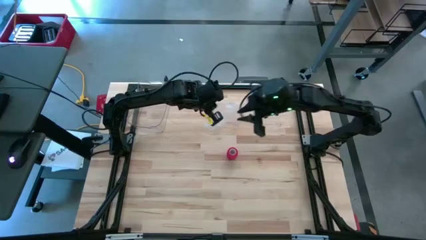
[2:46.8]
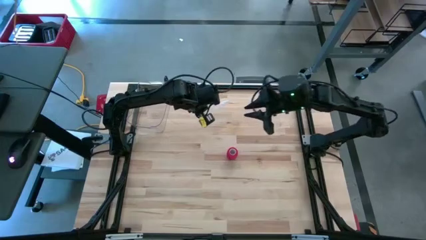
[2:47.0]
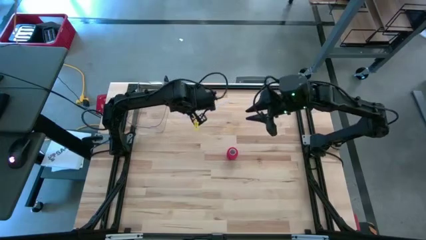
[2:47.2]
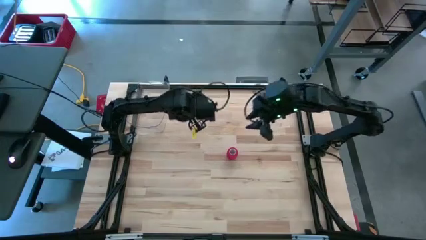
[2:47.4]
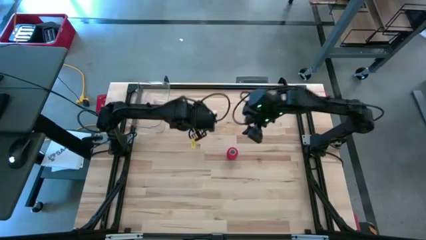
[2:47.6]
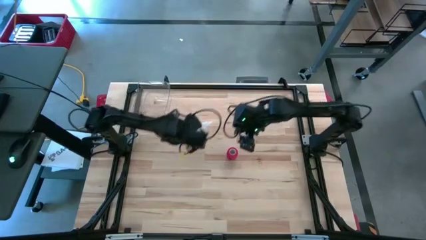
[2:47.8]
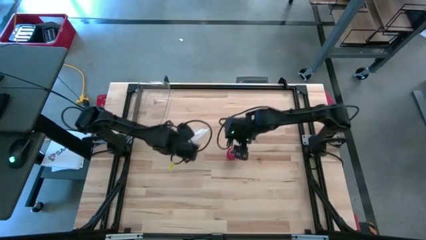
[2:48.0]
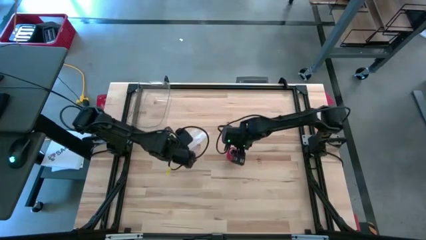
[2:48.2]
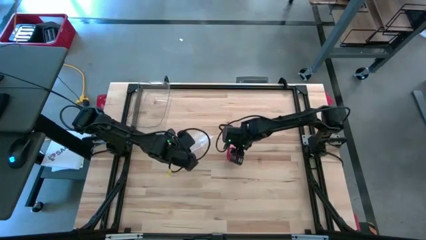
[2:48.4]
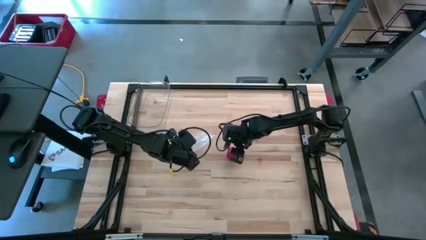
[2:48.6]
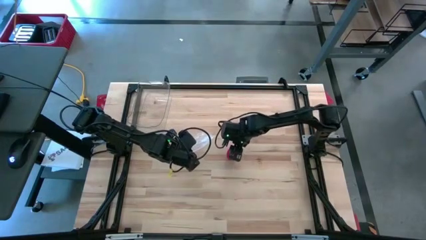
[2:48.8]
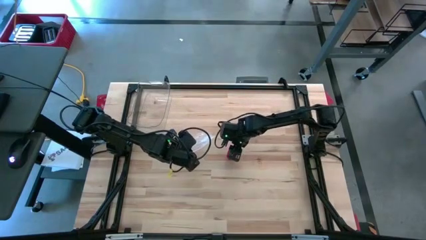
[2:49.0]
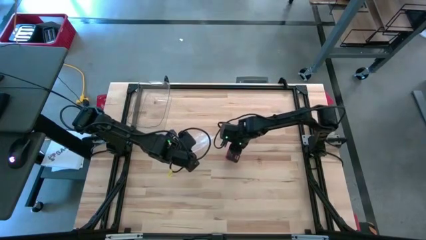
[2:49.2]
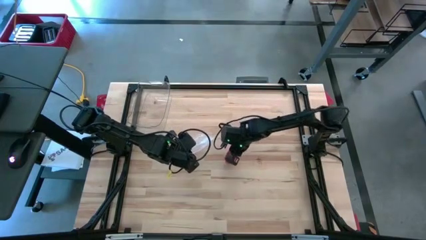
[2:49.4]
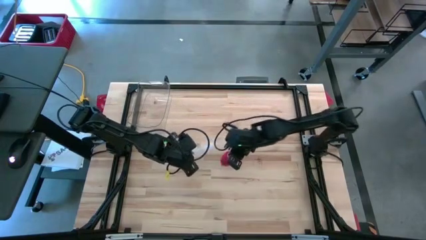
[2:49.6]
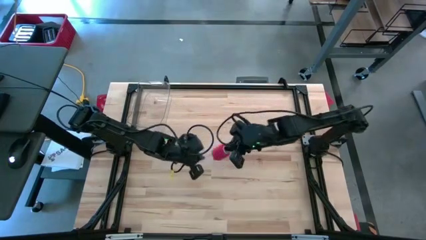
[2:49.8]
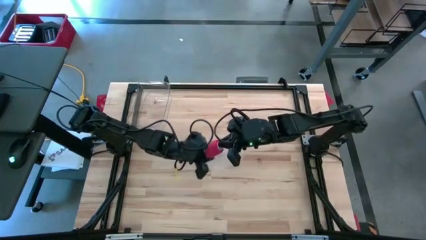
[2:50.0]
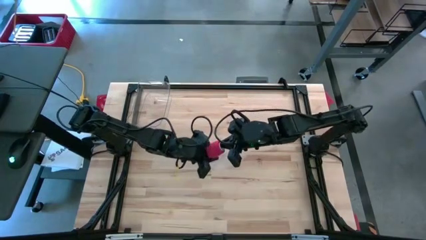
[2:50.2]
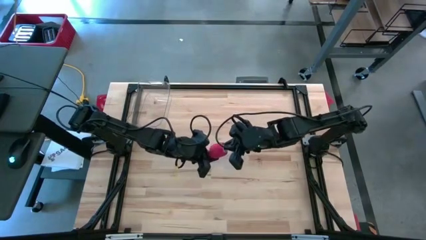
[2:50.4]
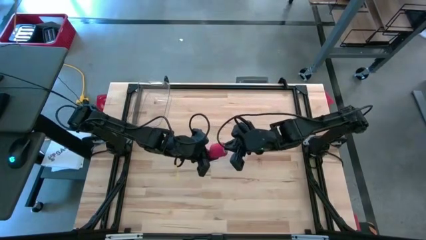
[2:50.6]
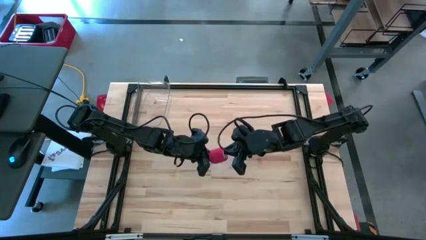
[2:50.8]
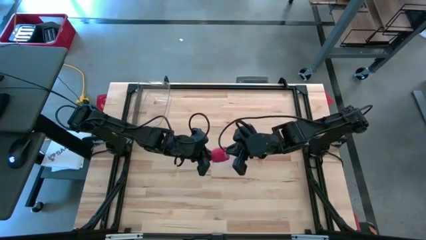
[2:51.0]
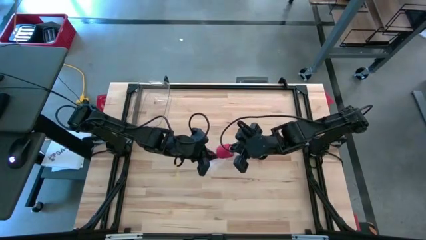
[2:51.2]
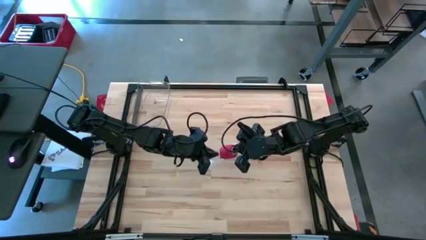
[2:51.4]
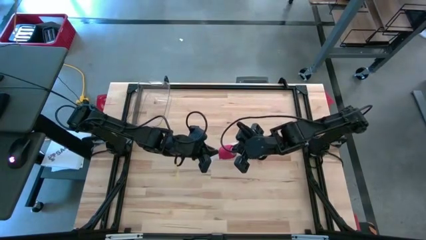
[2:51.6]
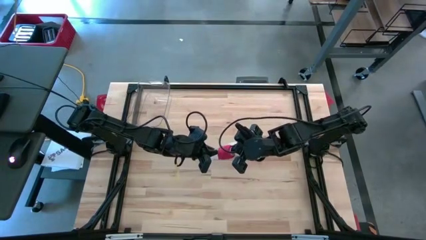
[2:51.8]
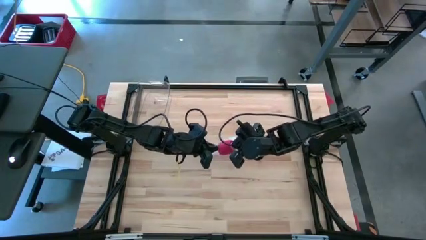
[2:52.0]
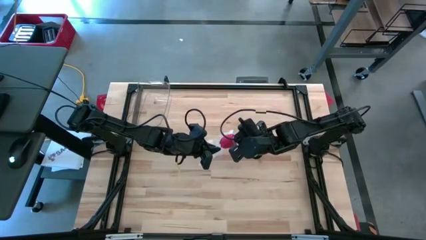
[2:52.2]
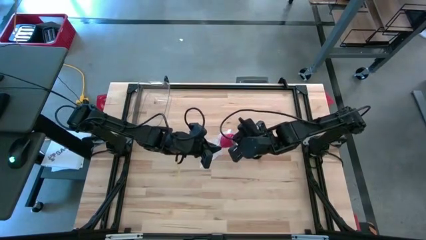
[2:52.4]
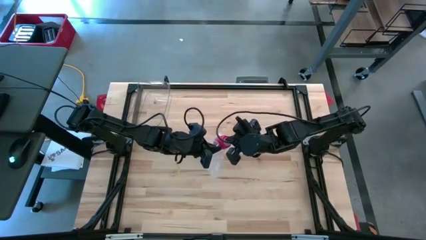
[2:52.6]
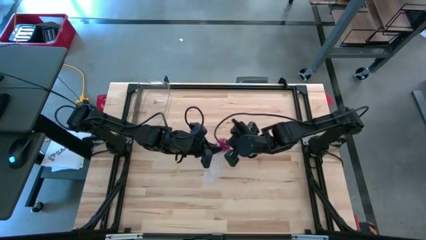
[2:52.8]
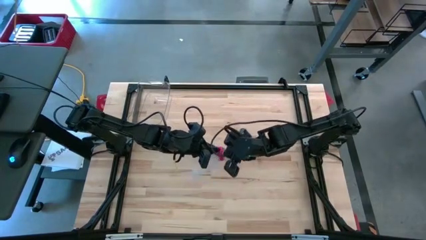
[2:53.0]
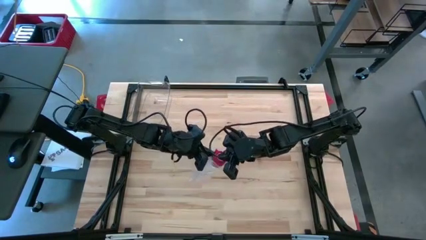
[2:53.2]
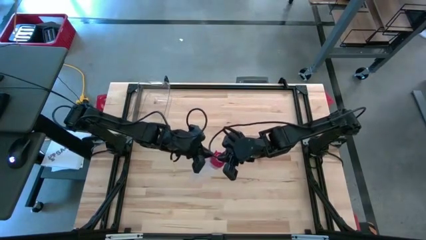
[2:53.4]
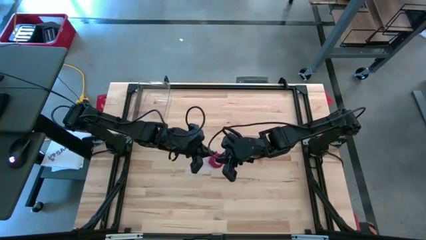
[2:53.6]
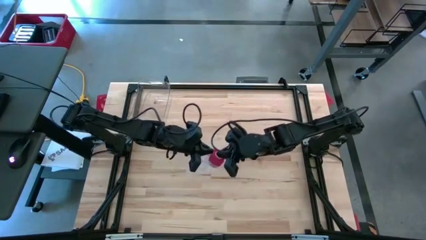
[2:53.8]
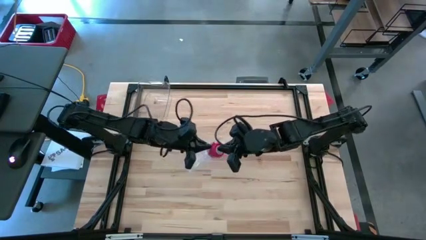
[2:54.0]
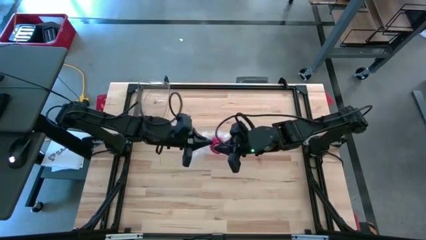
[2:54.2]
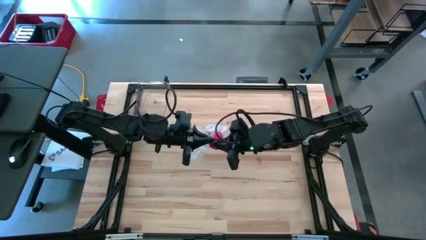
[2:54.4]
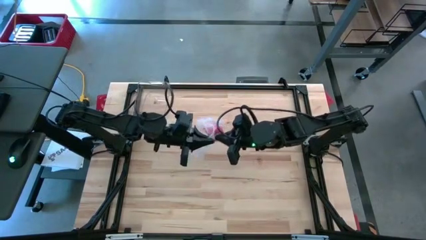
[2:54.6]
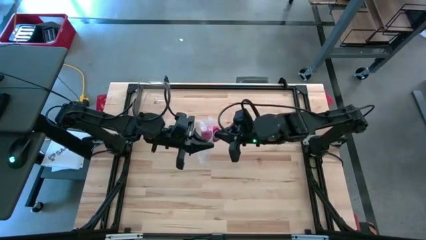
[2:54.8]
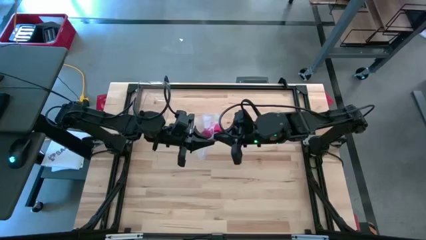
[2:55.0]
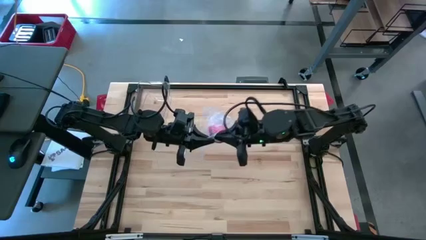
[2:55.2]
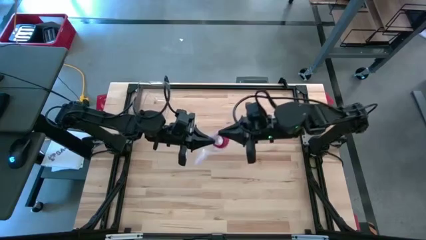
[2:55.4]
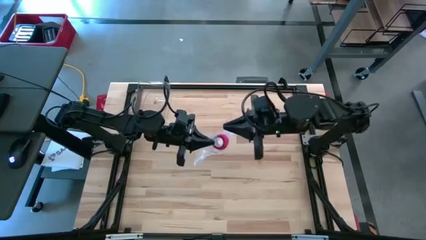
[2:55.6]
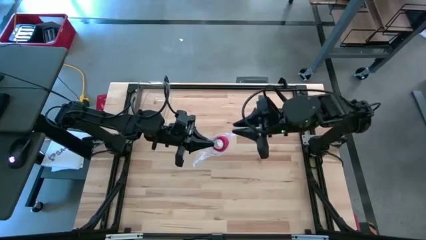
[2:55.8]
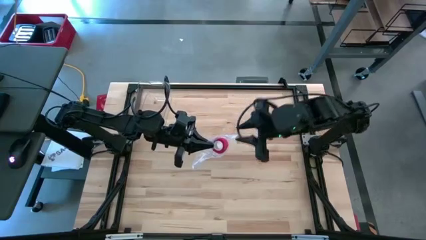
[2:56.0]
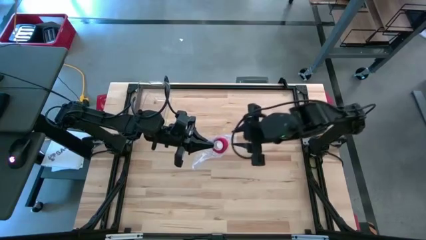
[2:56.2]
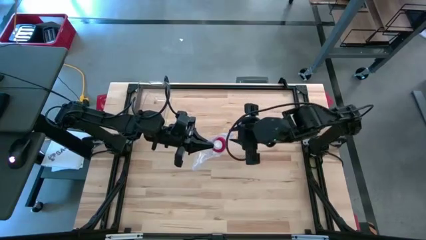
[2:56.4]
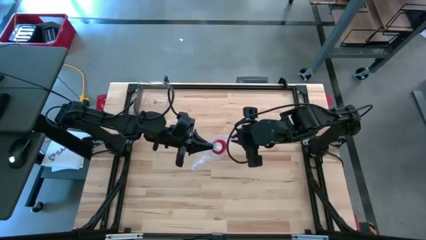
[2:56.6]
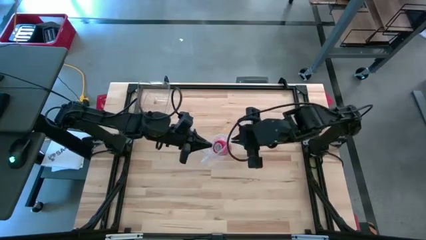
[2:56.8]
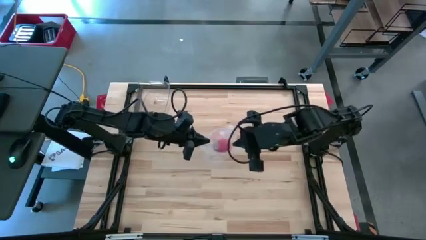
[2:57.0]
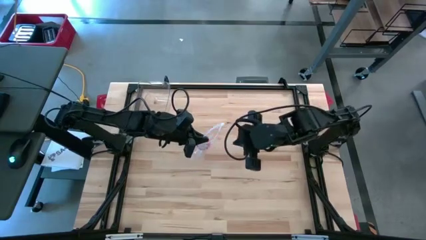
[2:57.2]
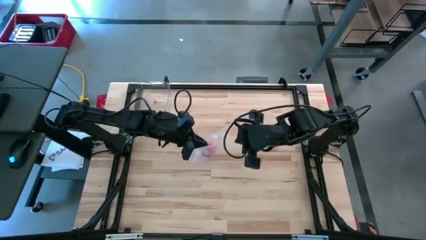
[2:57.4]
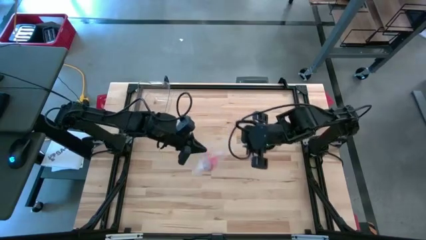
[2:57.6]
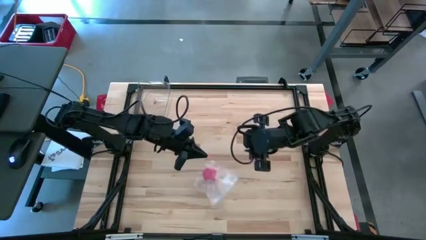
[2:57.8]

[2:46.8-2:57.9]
Task: Roll bandage
Put the red bandage into the transparent zip bag

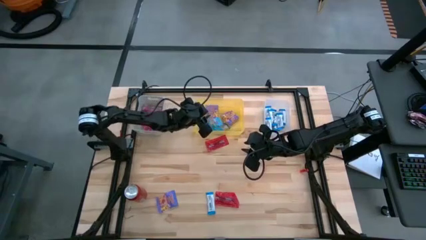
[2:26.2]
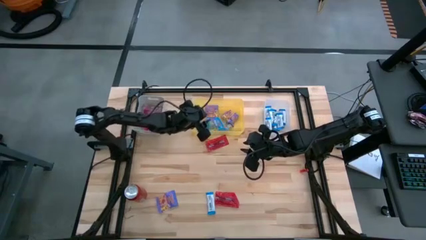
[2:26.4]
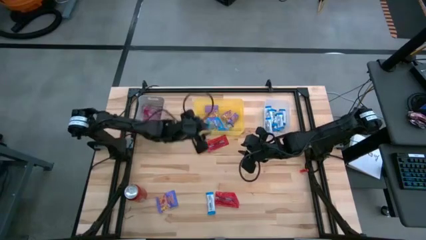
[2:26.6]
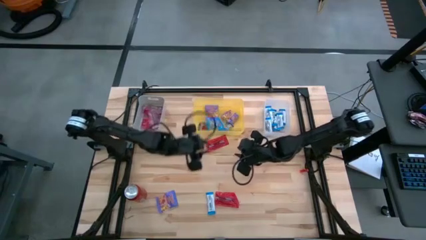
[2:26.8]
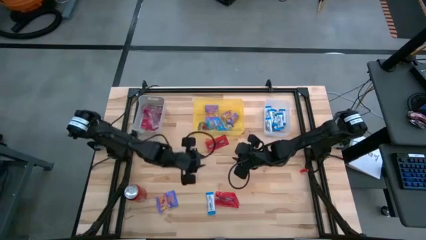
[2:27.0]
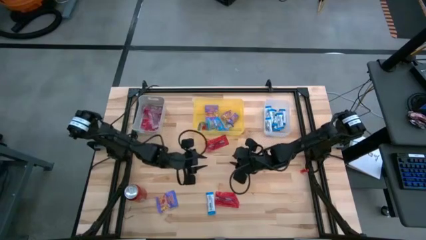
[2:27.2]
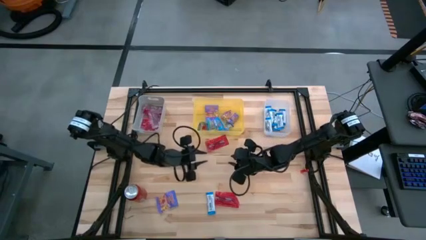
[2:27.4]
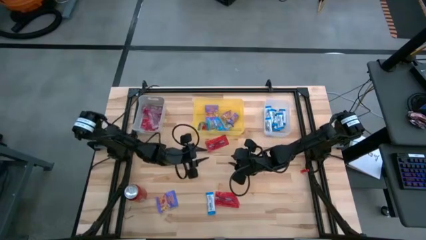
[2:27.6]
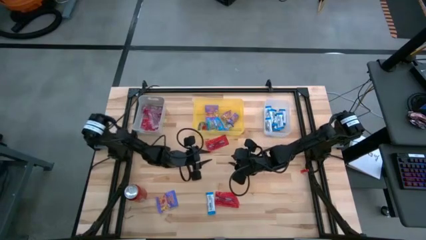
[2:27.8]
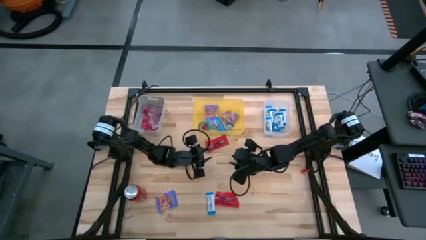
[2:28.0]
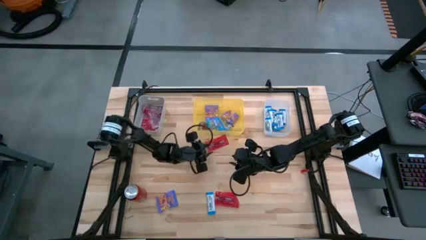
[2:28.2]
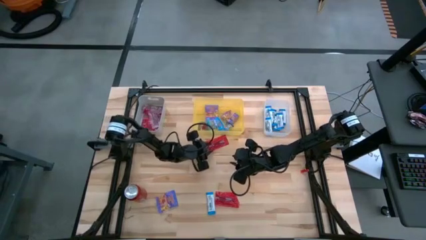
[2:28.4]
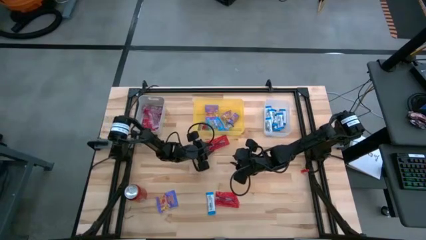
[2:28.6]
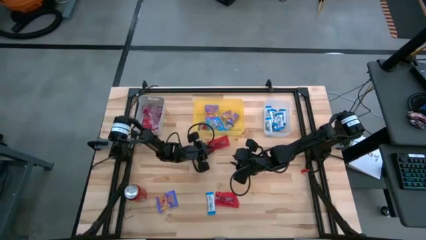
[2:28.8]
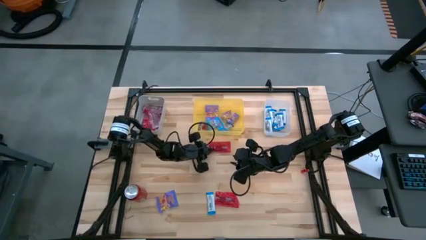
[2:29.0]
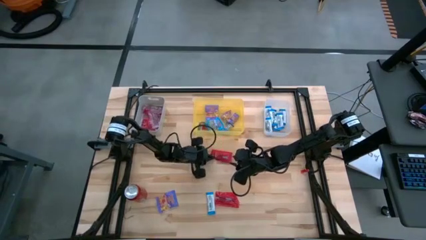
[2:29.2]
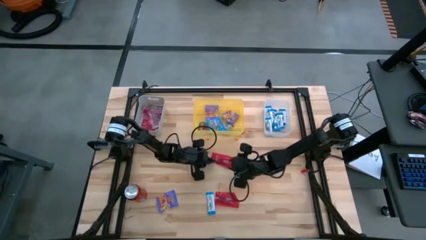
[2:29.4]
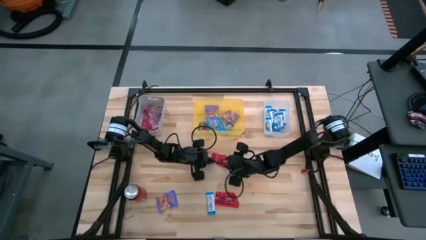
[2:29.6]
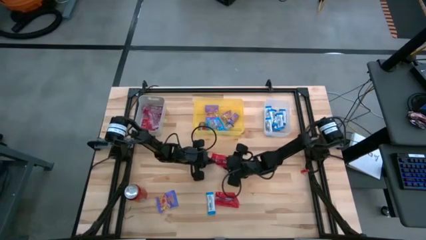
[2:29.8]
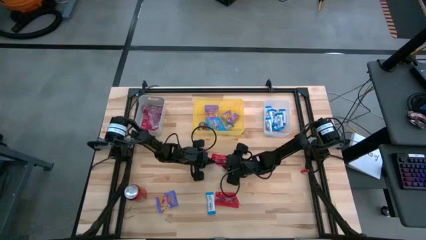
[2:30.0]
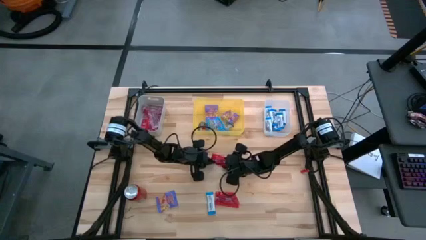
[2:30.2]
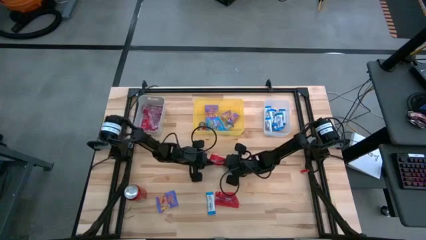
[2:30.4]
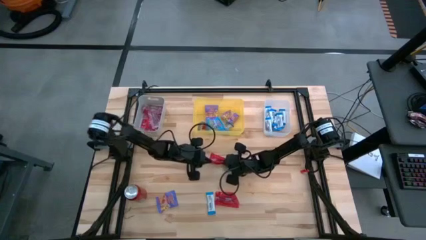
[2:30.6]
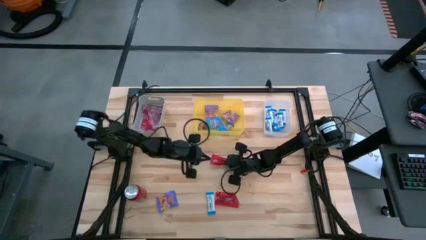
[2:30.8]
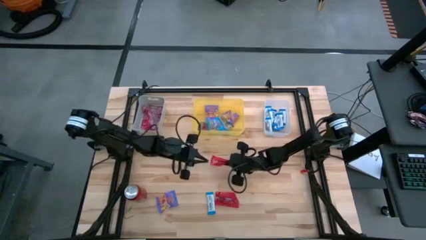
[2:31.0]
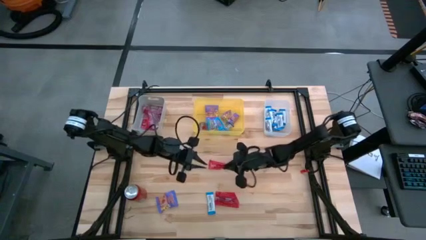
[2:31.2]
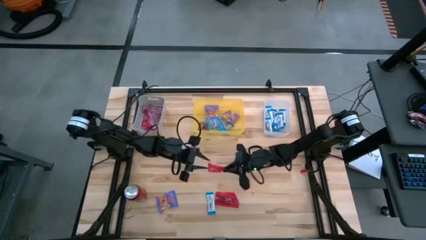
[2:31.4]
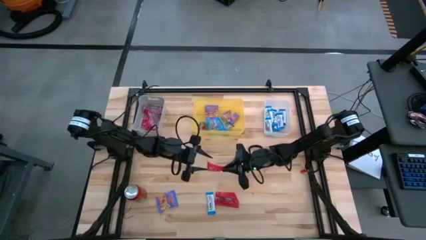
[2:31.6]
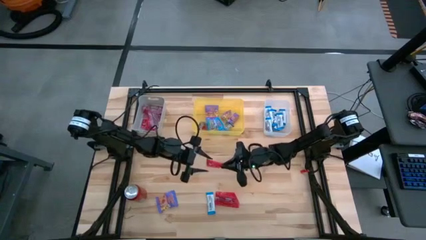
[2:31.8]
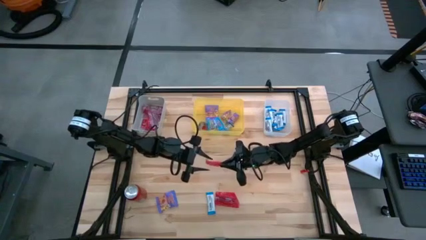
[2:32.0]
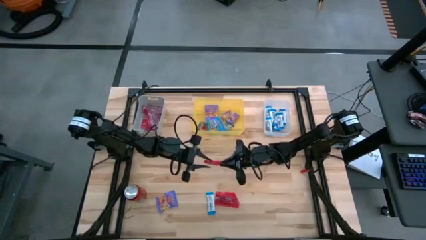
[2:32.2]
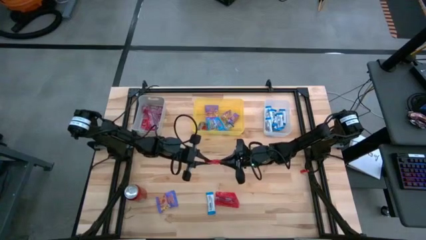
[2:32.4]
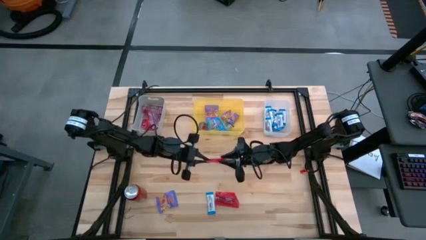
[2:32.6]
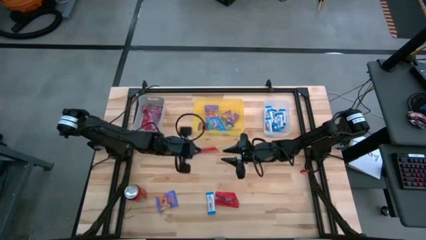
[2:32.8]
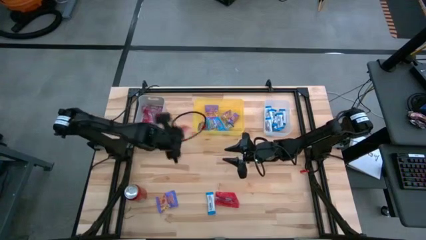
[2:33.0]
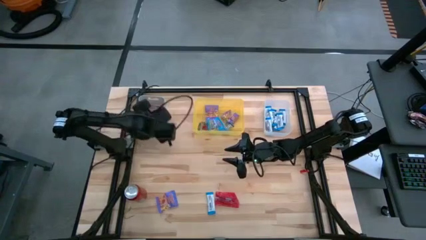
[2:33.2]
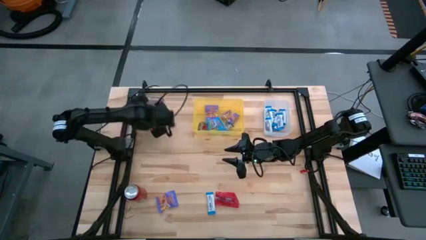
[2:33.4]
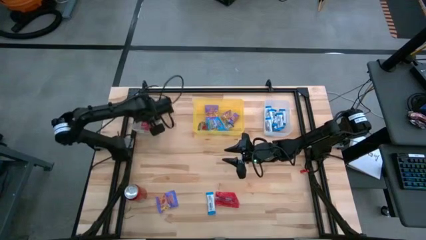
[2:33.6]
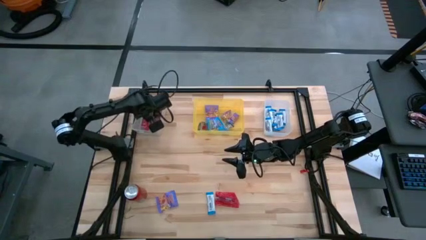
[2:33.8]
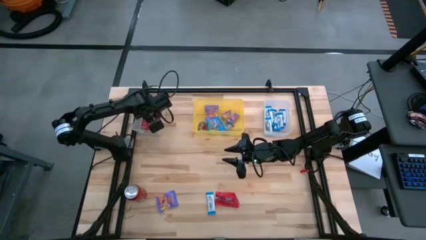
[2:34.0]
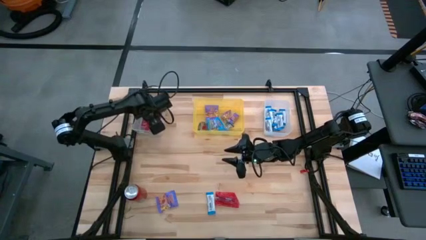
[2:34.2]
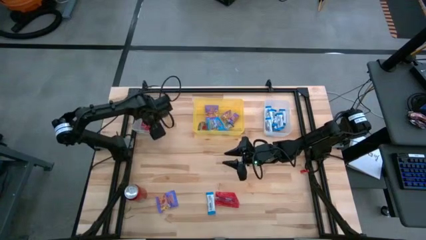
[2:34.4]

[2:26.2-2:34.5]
Task: Sort candy
Put the red gummy into the gray bin
